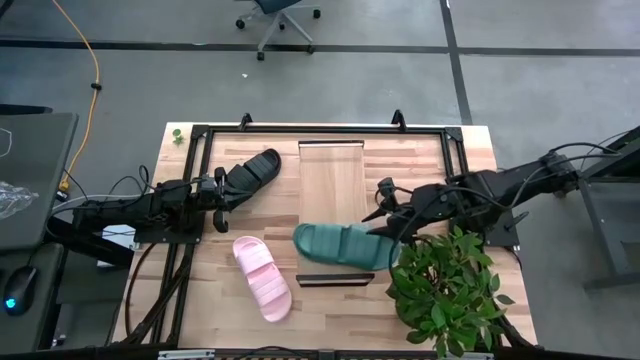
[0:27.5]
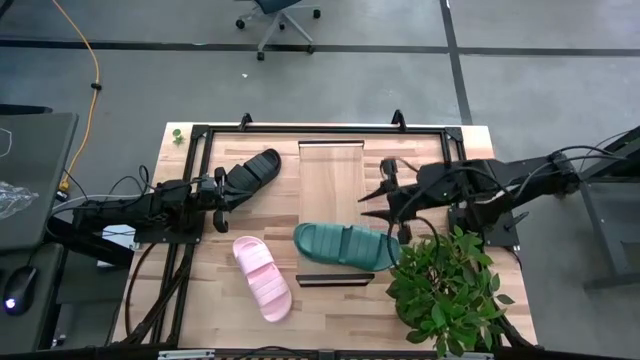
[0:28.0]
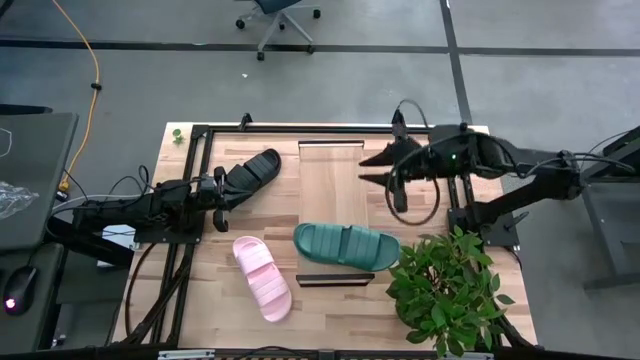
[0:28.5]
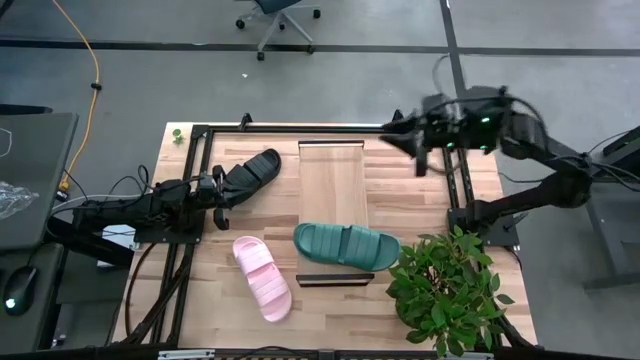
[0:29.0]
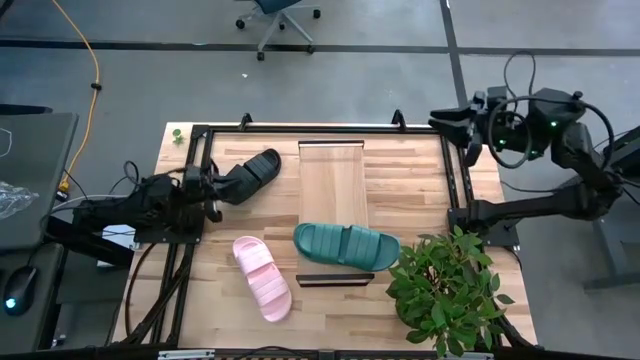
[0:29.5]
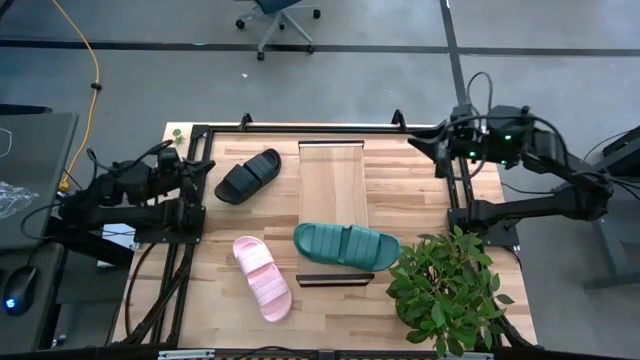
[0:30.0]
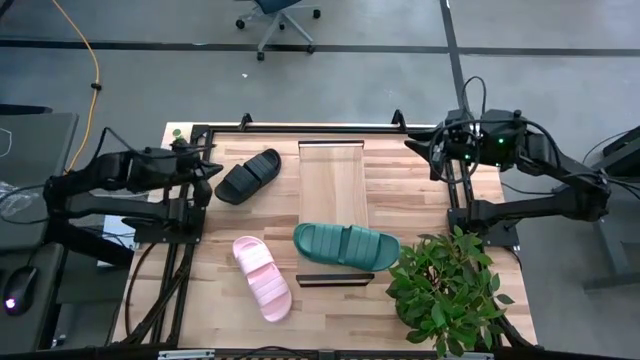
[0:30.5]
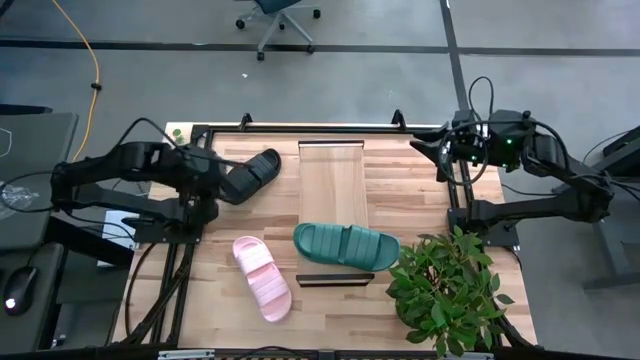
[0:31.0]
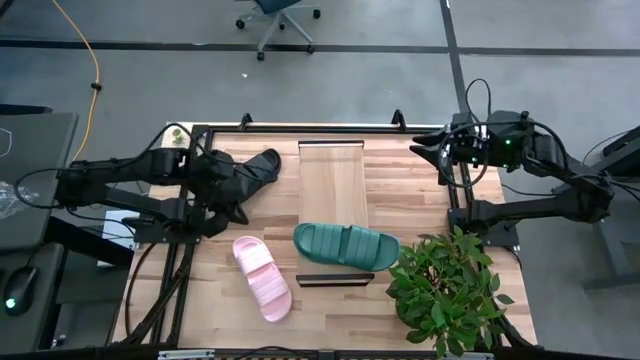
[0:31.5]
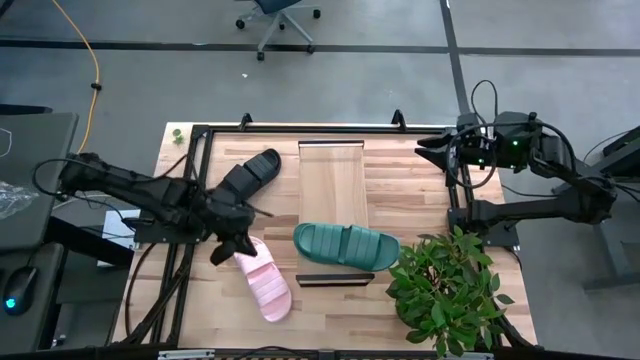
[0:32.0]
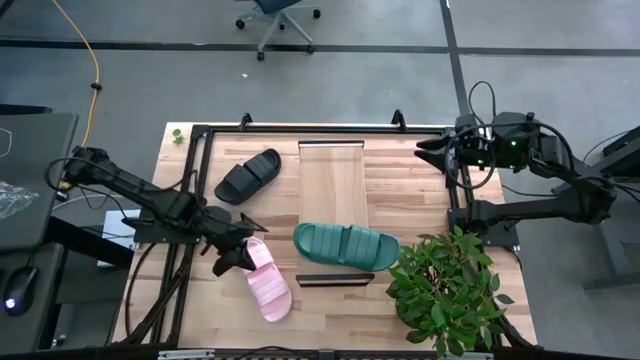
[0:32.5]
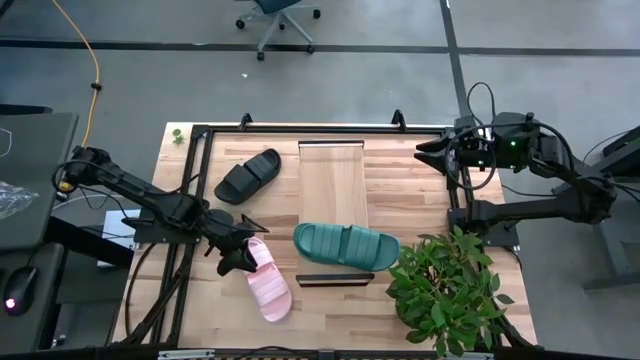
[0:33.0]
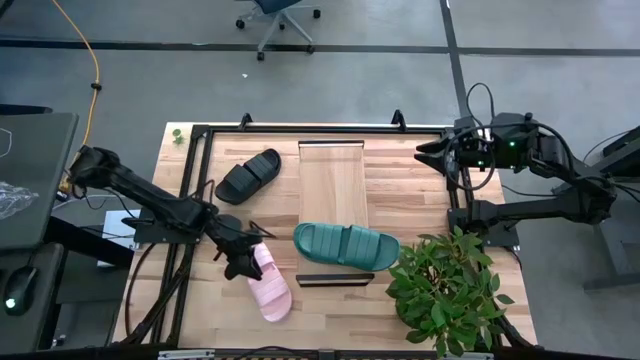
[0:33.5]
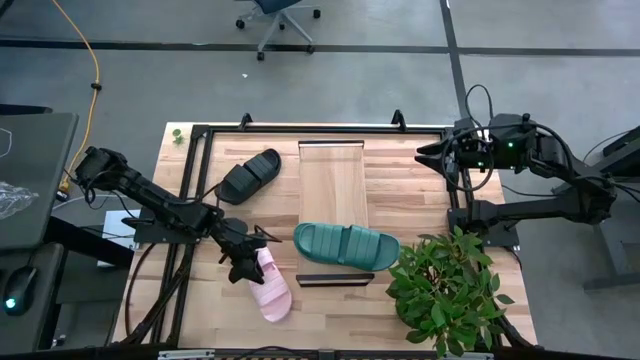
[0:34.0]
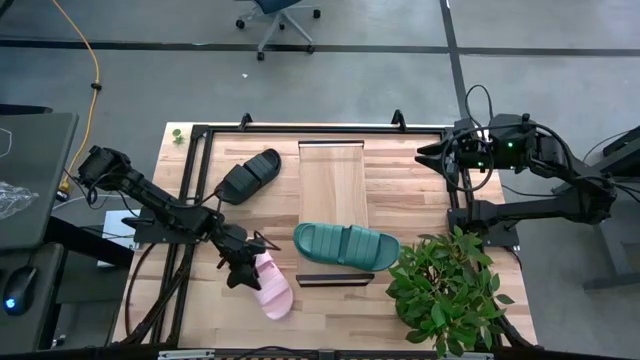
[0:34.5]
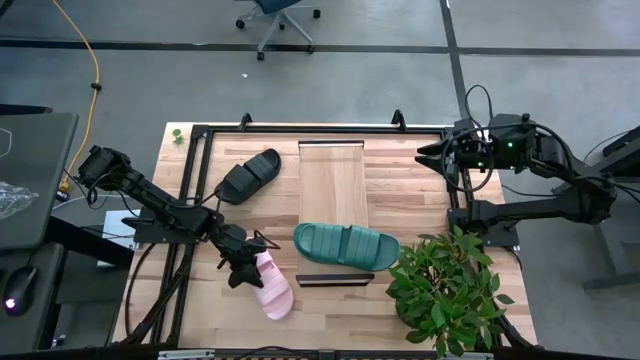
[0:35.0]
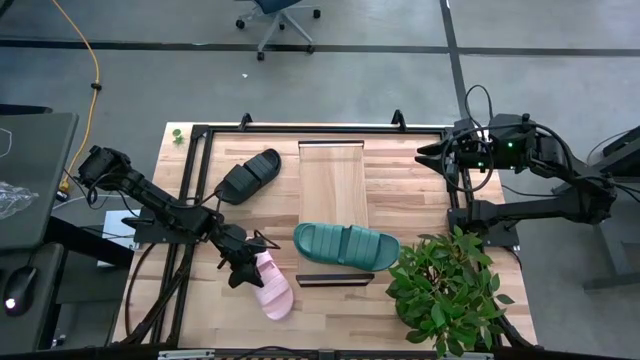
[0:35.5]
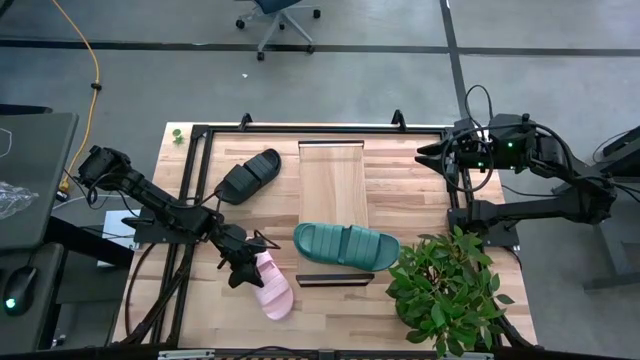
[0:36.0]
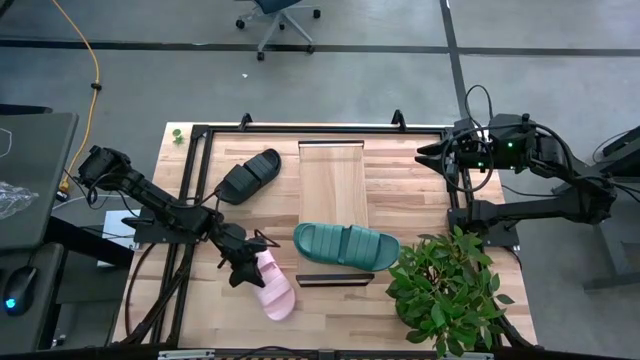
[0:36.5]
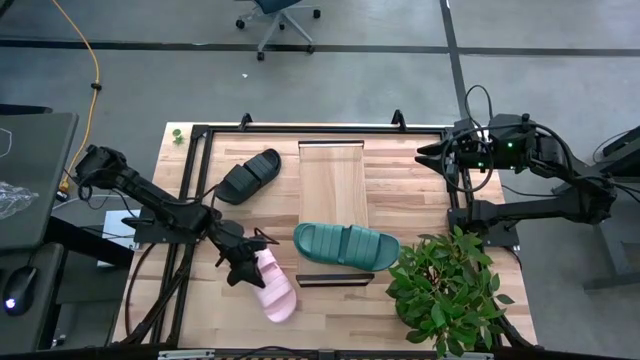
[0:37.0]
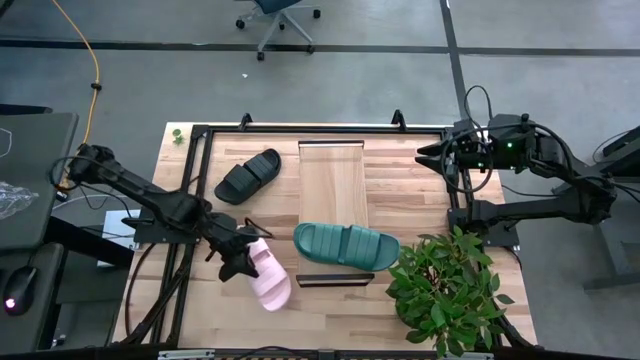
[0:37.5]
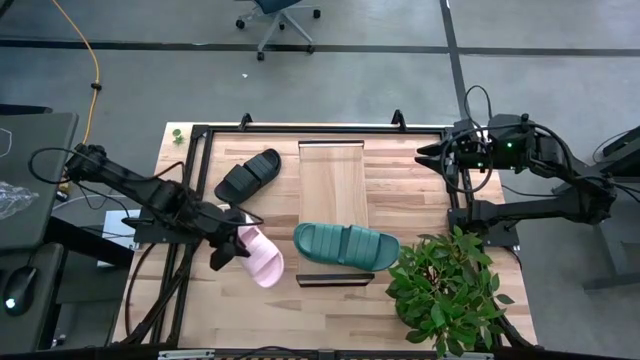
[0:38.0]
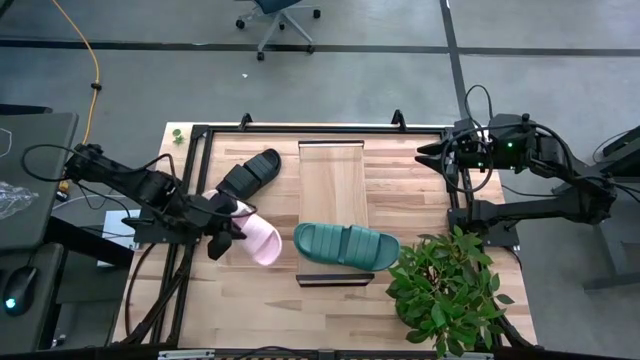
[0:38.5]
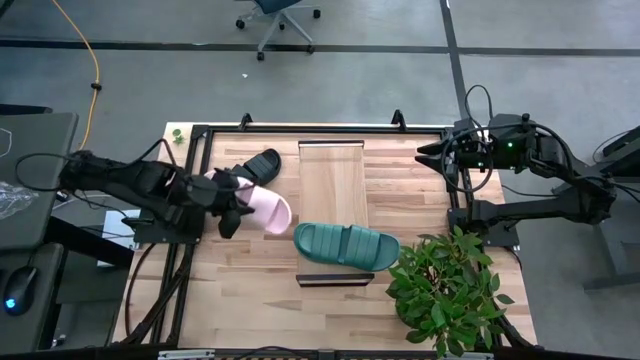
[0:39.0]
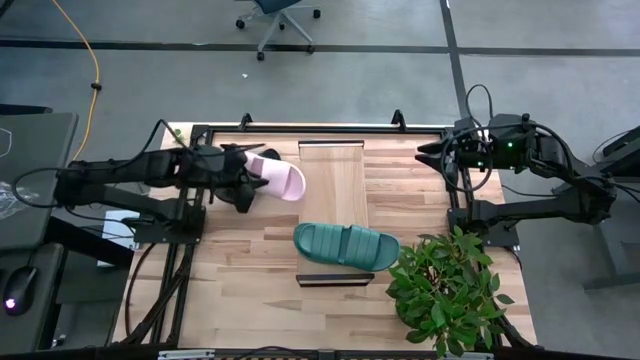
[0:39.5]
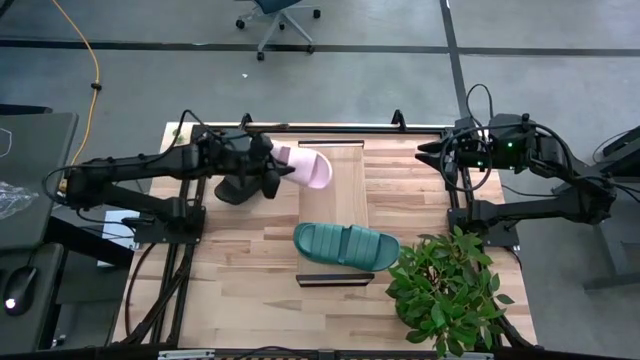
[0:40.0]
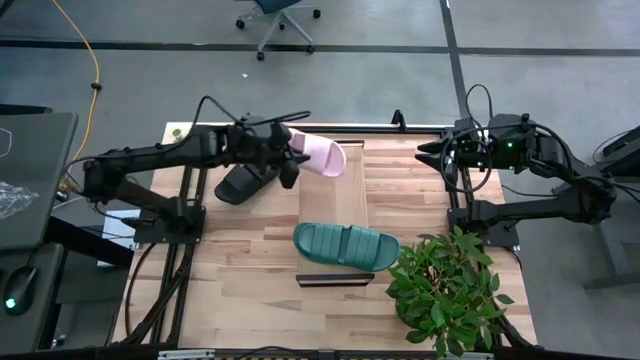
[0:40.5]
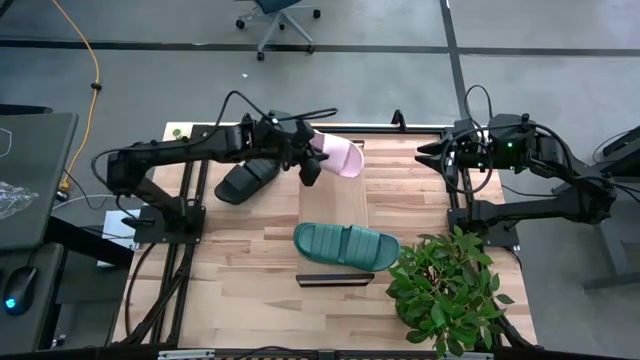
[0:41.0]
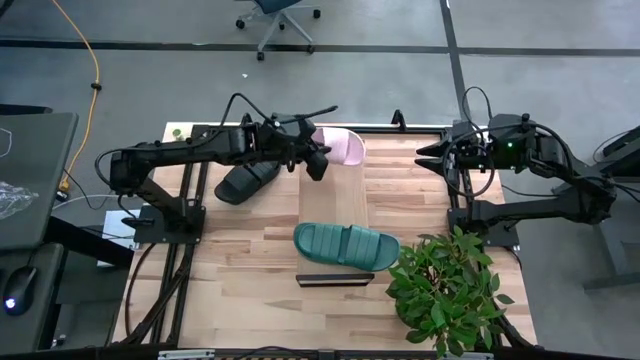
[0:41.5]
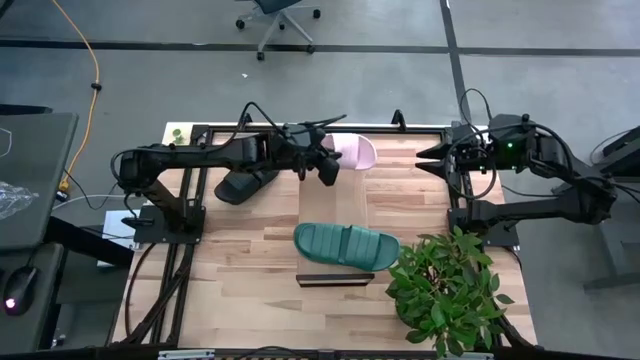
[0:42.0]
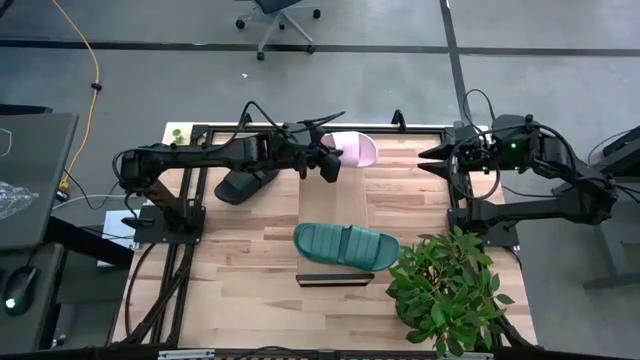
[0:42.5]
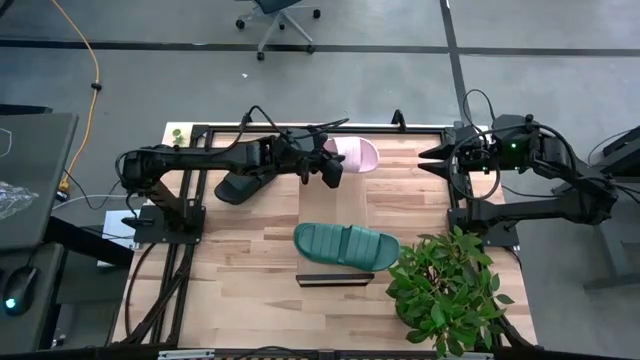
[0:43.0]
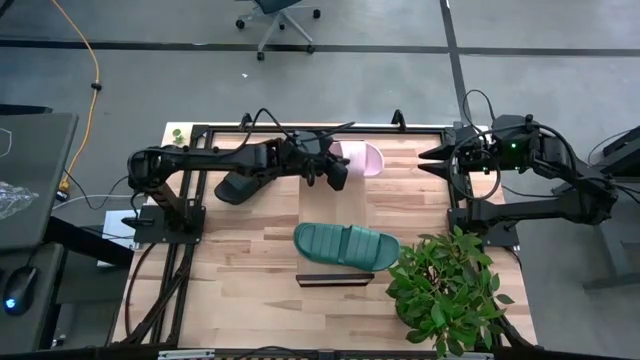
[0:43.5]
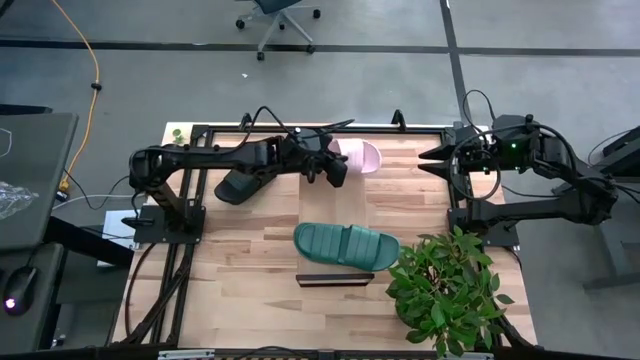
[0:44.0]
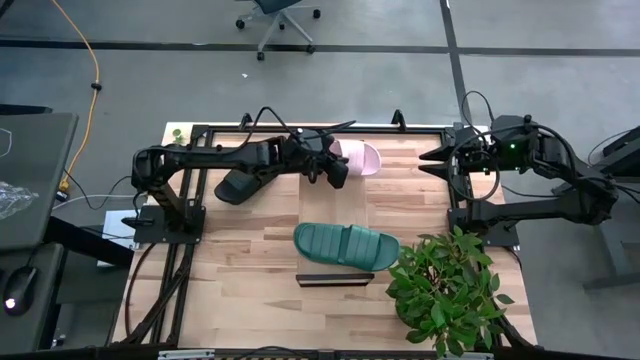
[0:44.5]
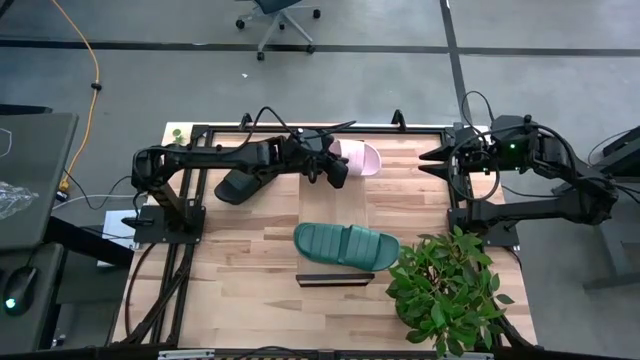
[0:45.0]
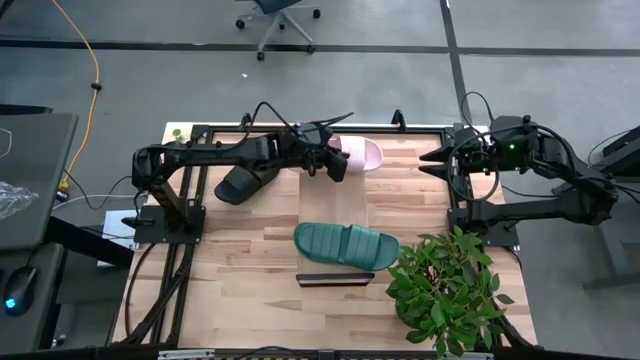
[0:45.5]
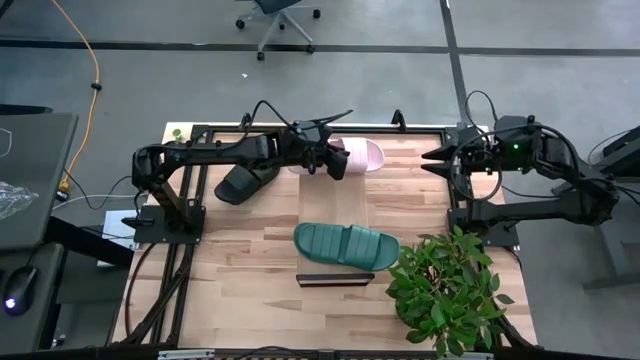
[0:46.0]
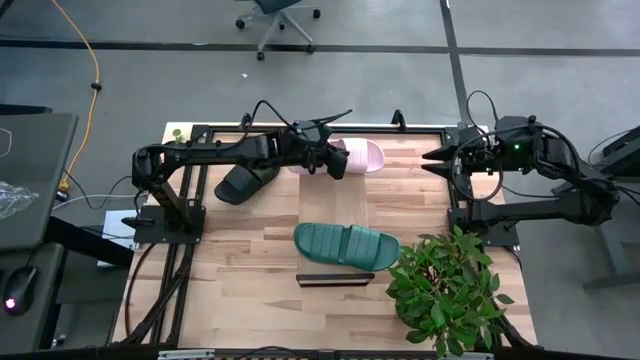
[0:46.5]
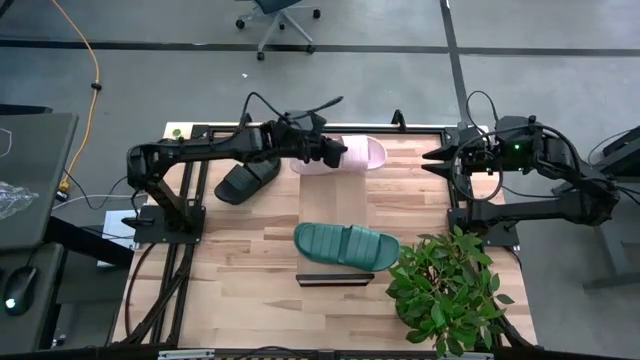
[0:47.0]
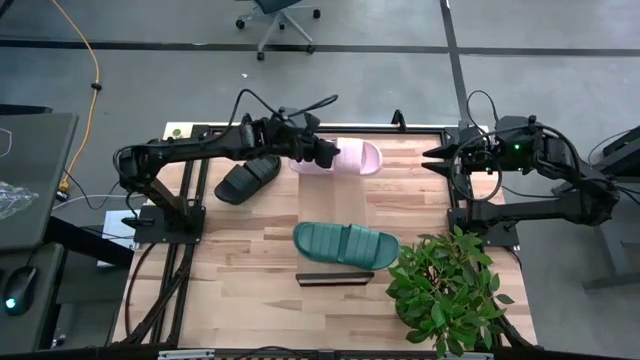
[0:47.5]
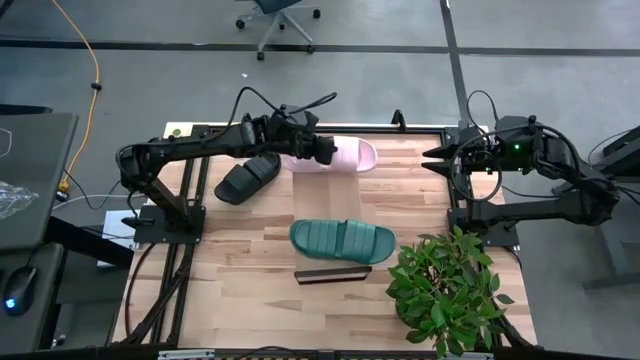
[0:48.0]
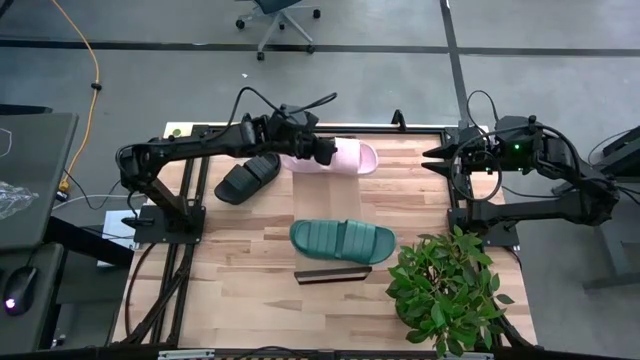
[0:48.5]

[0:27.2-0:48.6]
Task: Pick and place slippers onto the shelf
Put the pink pair of slippers on the shelf

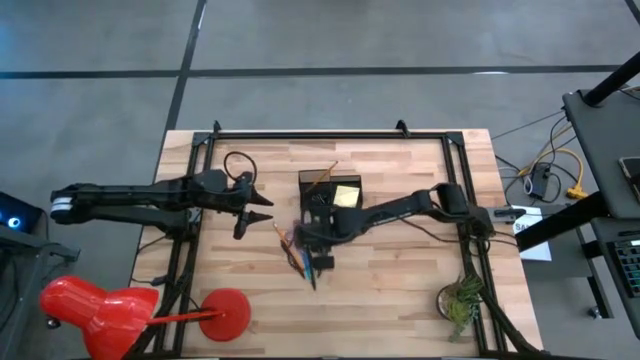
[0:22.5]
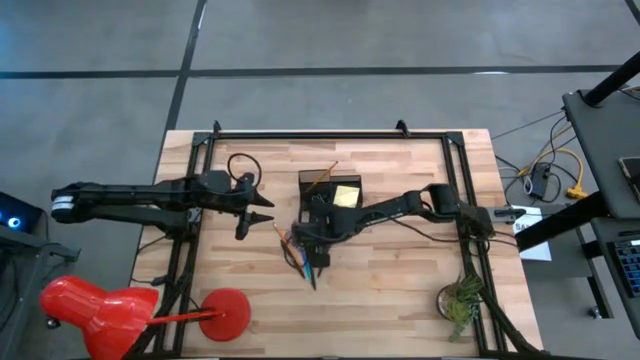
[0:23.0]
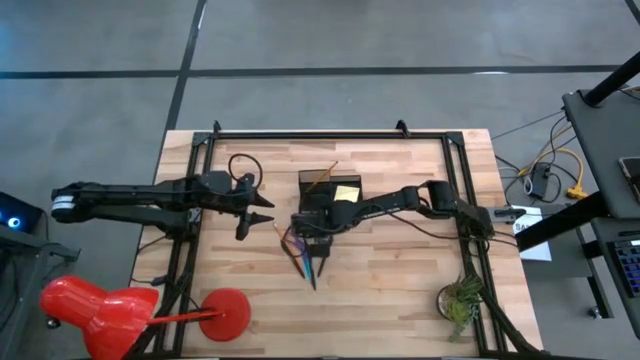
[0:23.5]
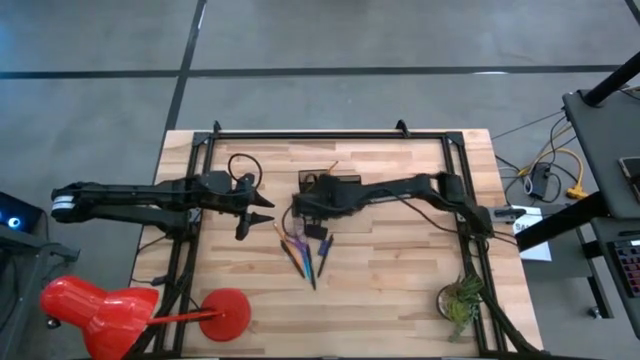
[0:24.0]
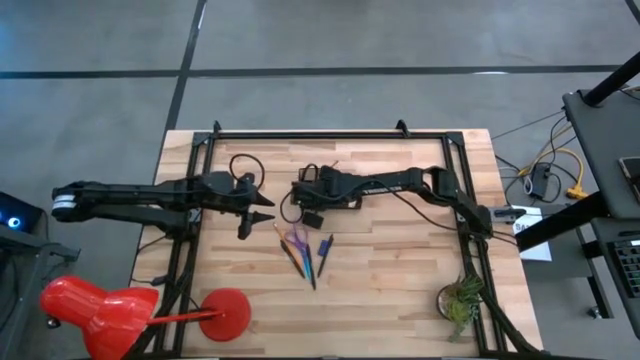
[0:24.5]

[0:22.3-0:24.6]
Task: Pick and place office supplies into organizer
Put the black binder clip into the black desk organizer
